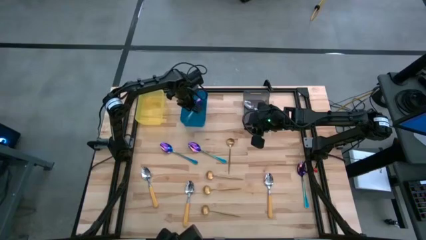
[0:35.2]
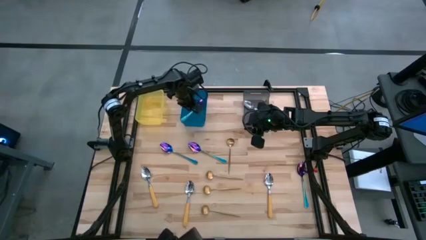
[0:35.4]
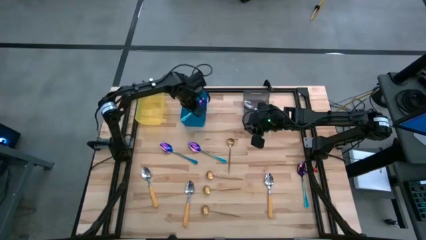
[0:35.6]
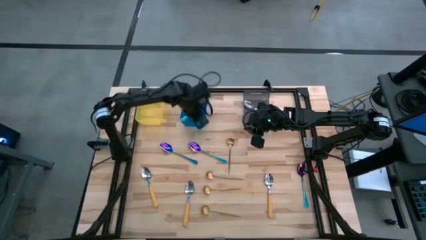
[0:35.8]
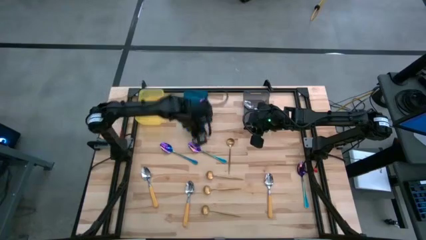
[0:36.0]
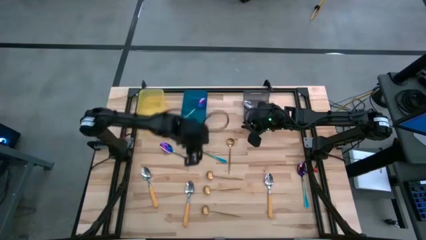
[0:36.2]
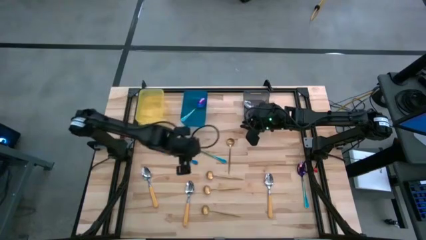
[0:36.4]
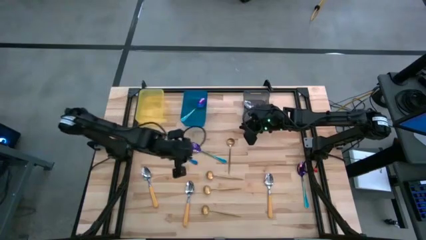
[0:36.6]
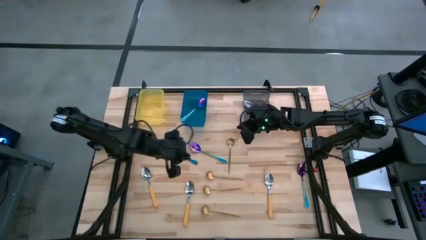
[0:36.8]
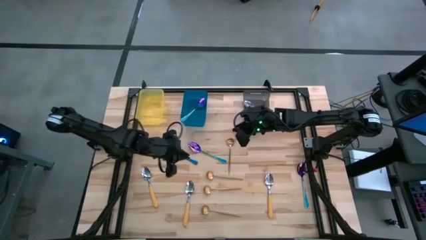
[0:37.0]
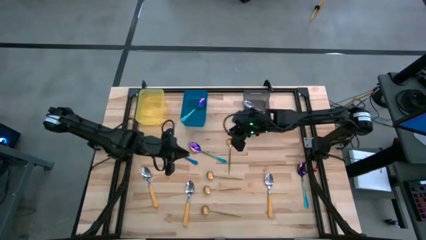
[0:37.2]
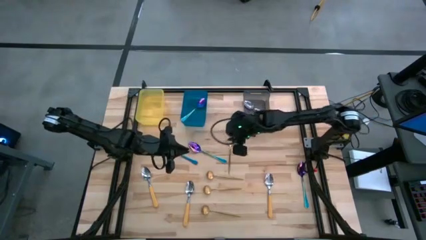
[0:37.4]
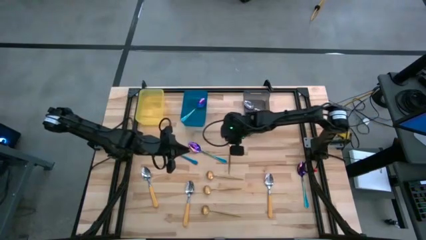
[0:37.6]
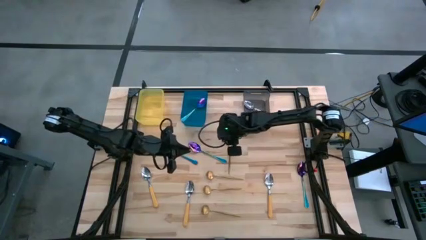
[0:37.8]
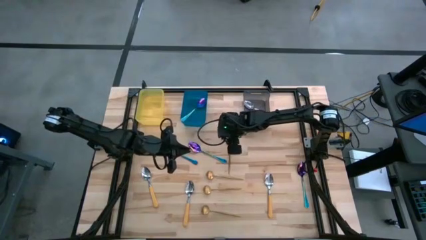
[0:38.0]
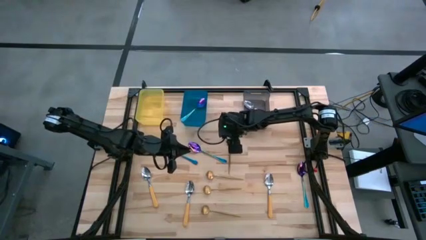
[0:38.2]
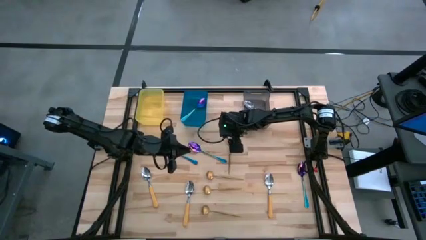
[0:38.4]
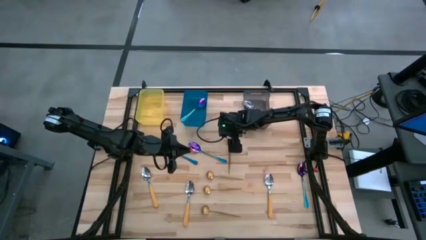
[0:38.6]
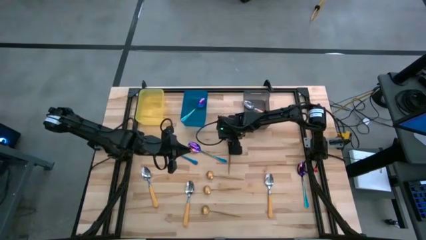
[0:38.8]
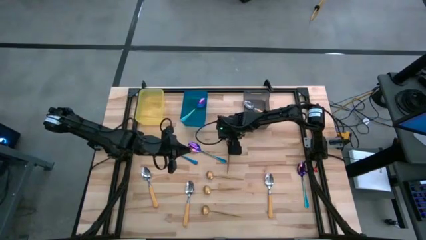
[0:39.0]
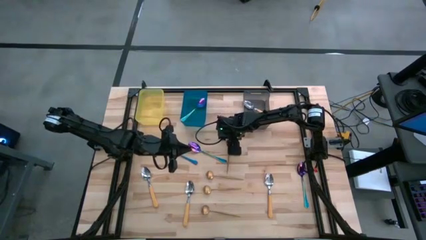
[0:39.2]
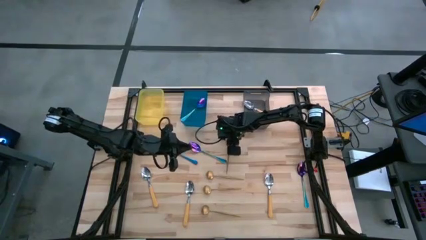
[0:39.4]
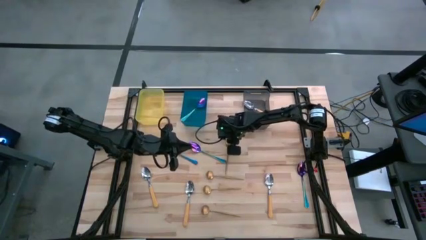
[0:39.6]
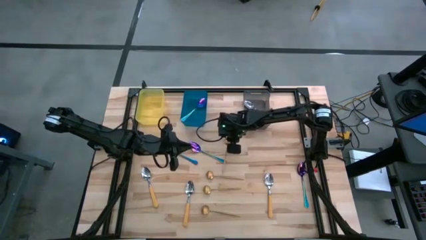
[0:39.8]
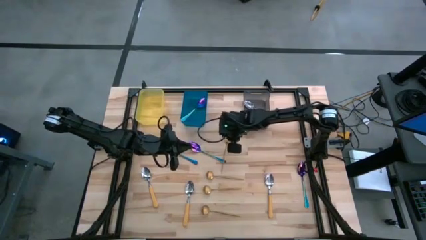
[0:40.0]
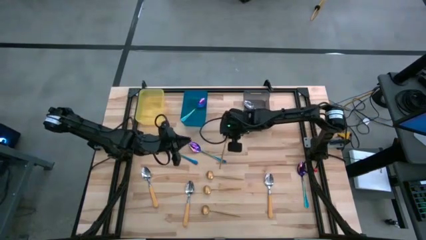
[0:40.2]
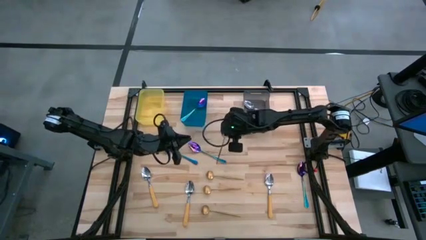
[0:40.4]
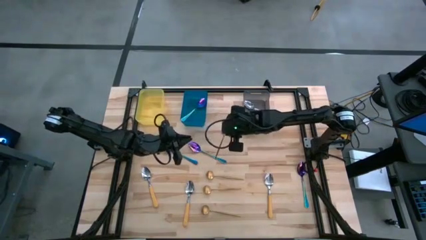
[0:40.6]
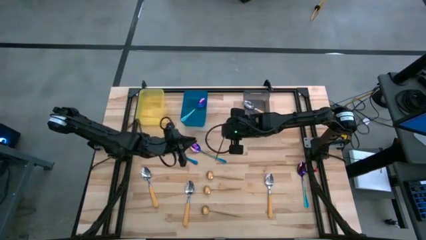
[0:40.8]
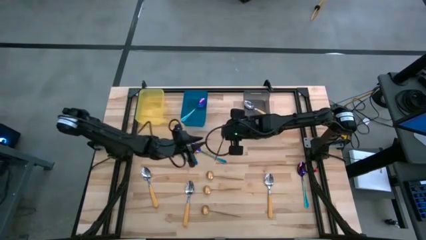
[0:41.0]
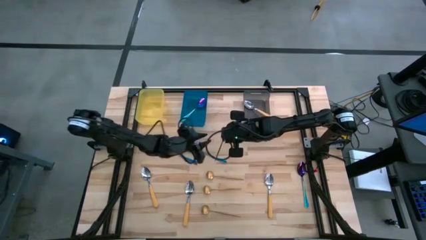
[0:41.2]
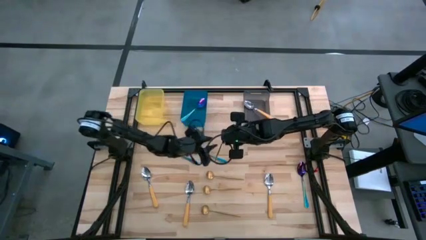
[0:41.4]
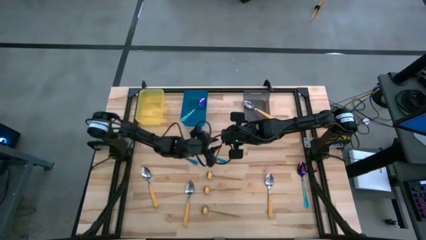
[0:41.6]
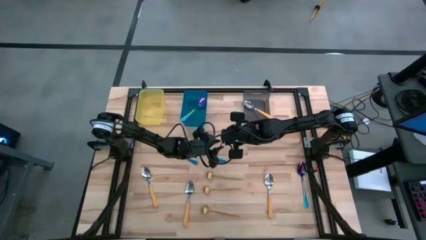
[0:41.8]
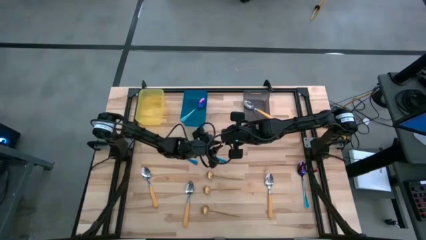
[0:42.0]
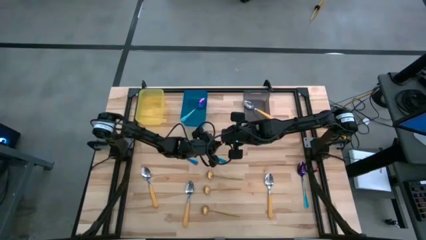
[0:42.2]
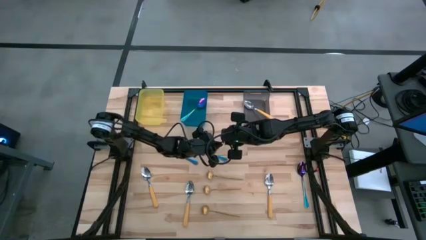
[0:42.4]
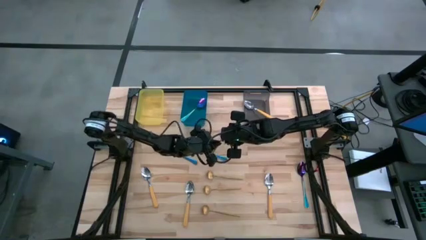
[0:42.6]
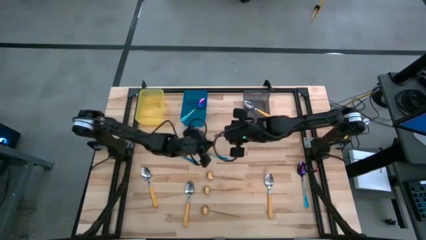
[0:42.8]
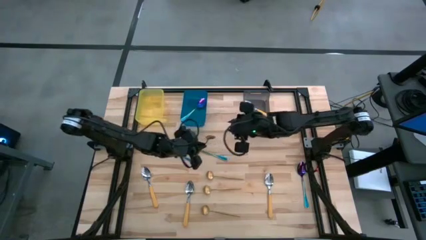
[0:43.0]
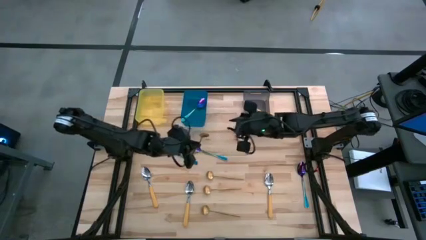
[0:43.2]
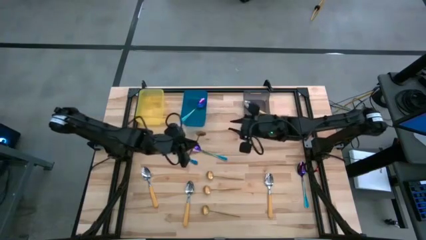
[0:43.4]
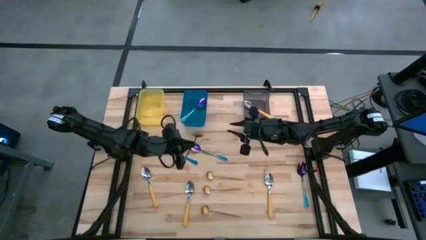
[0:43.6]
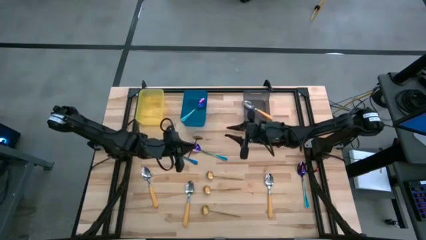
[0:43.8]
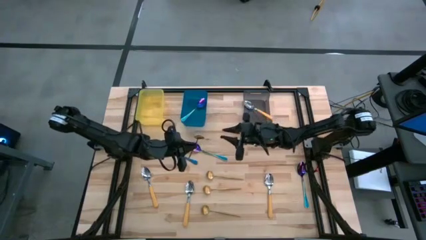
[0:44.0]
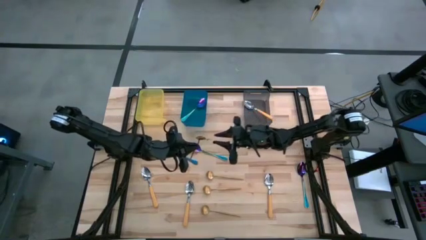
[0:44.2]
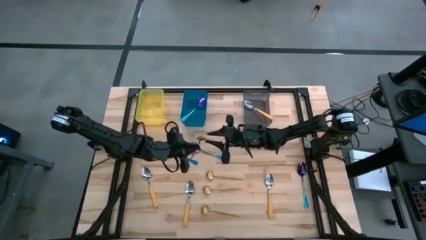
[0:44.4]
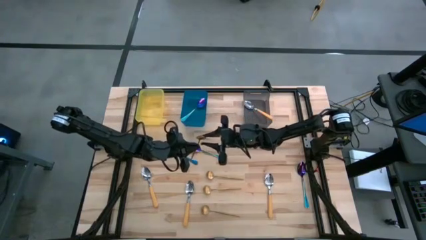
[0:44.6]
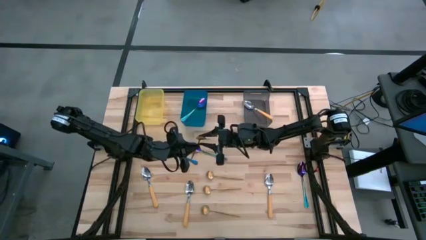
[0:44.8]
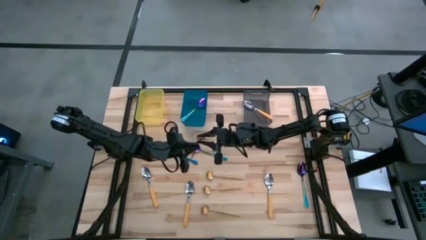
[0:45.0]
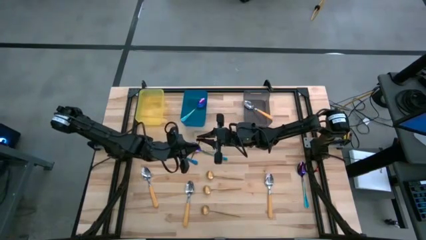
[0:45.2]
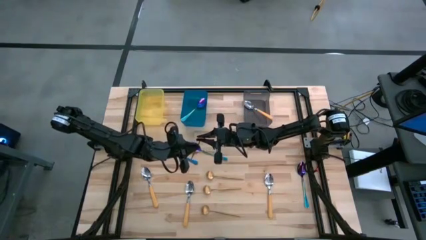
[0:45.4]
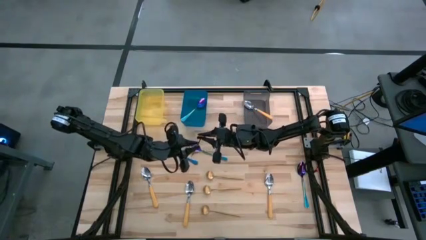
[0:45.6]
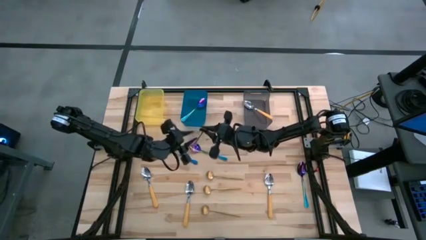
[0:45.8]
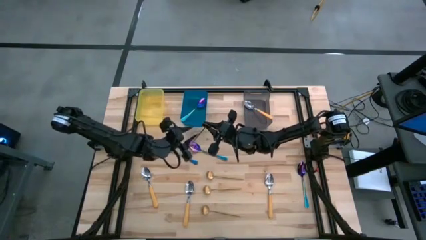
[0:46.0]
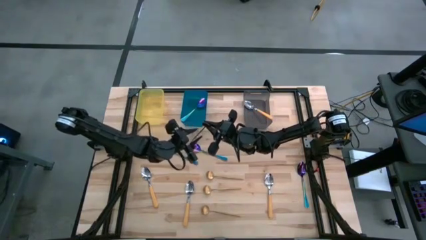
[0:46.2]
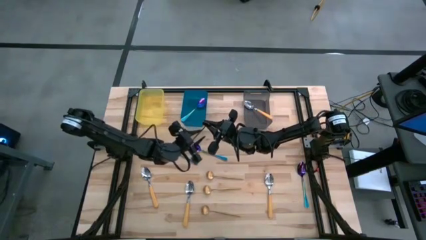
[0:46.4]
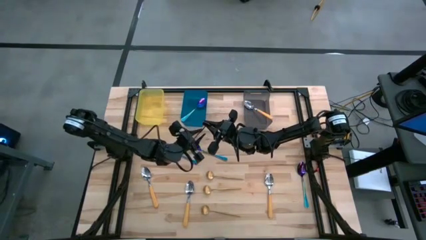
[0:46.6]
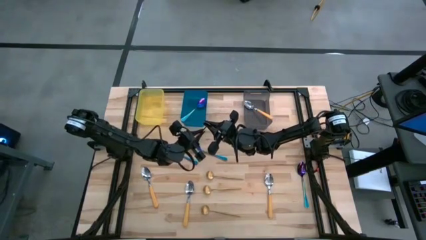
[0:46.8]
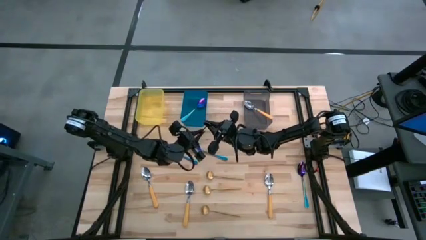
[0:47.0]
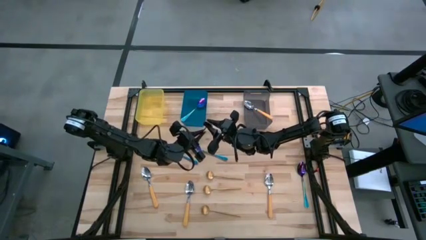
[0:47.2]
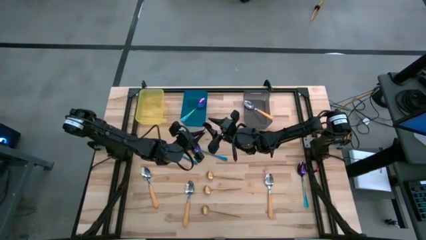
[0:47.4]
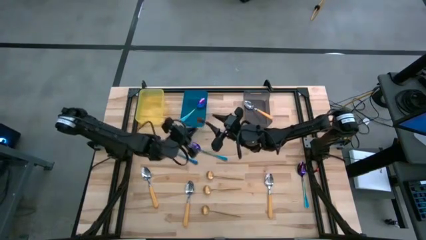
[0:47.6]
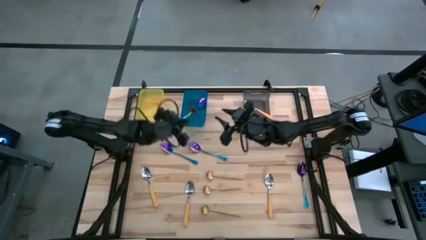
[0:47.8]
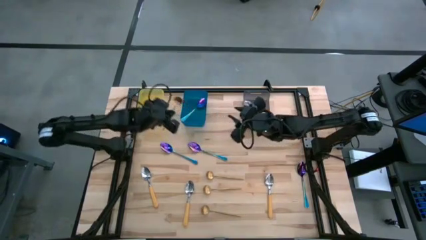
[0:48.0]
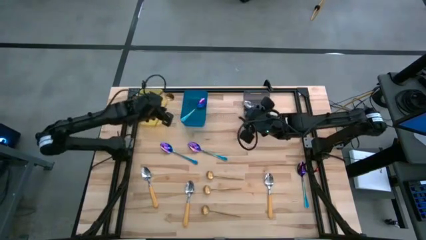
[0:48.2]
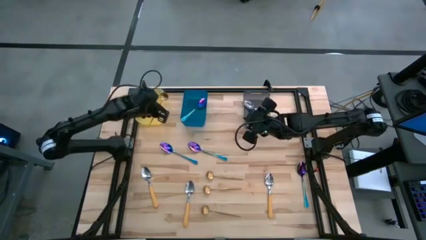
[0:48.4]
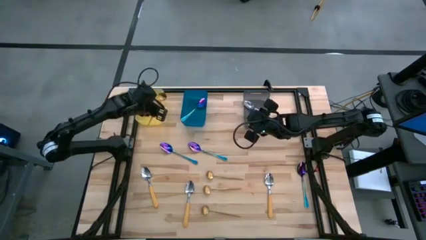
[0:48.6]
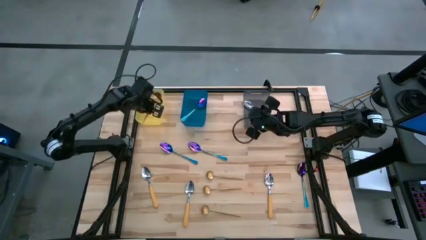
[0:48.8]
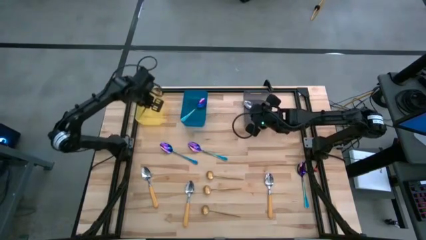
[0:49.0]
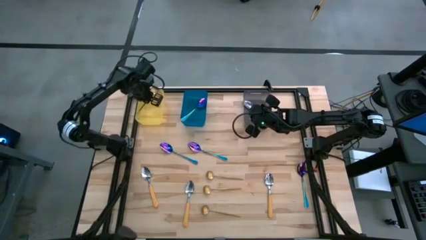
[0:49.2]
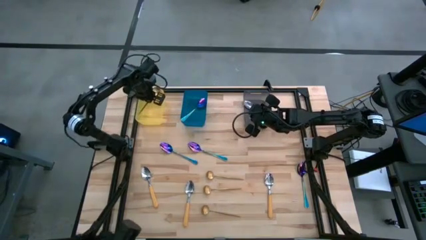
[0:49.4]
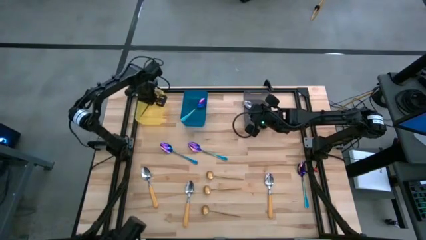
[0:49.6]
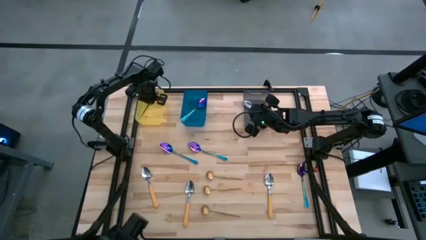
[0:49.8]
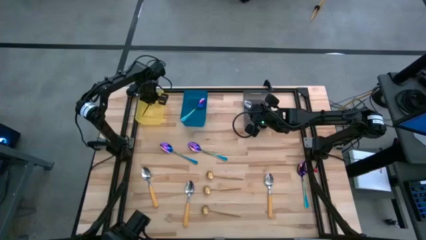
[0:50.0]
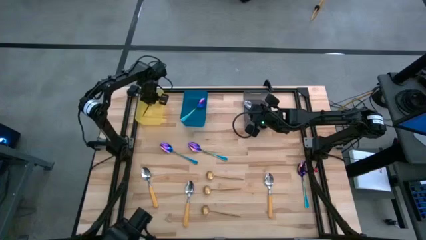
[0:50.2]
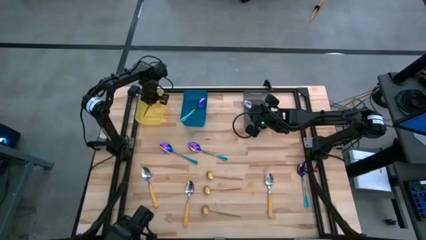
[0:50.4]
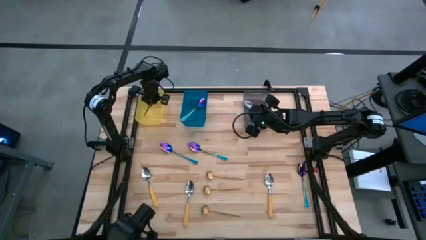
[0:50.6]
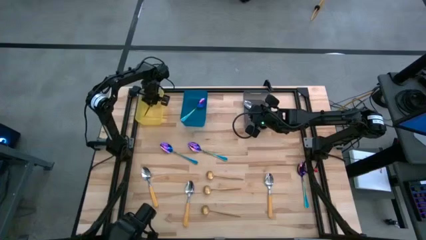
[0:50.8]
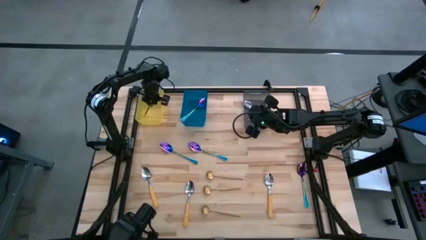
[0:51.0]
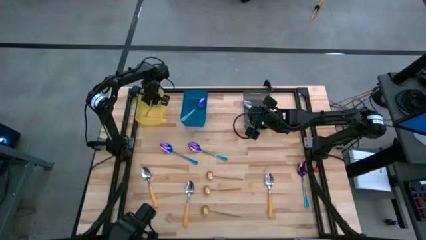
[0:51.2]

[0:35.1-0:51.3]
Task: Sort silverware by color (type)
Put the gold spoon into the yellow bin

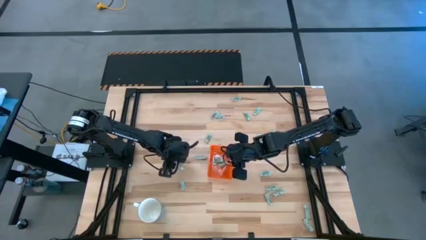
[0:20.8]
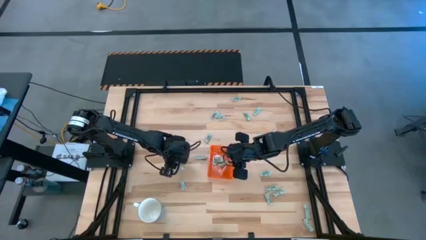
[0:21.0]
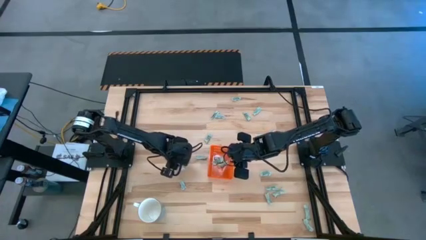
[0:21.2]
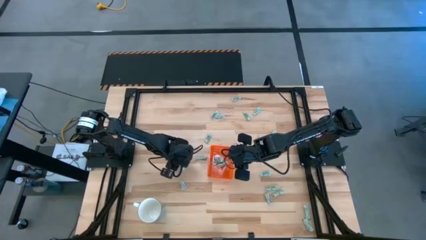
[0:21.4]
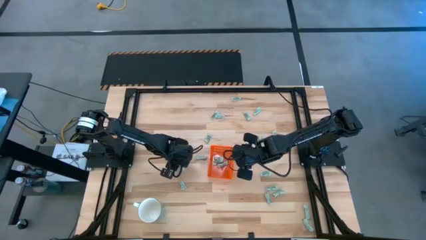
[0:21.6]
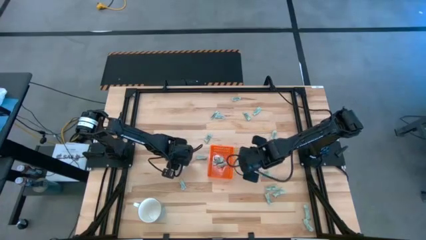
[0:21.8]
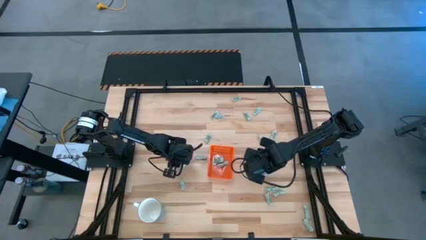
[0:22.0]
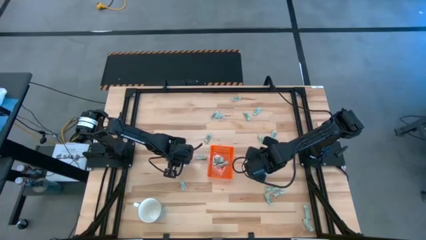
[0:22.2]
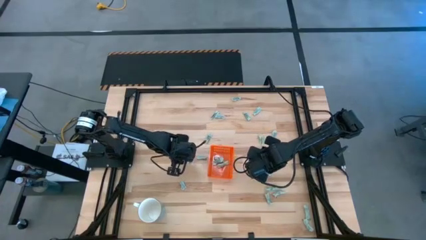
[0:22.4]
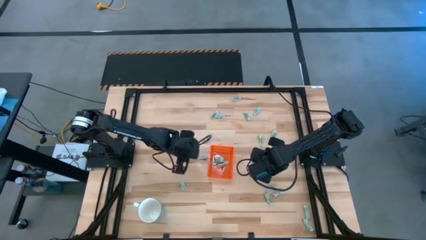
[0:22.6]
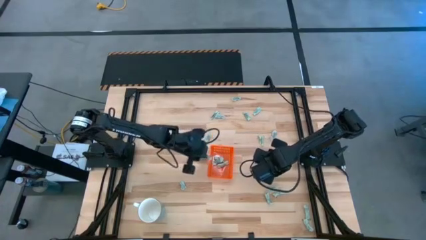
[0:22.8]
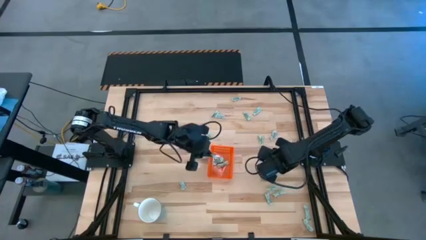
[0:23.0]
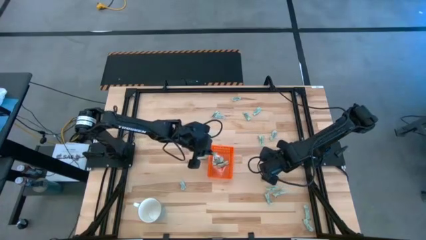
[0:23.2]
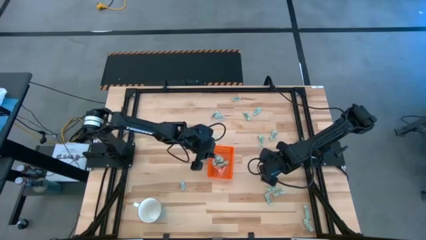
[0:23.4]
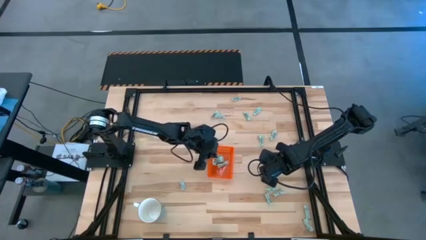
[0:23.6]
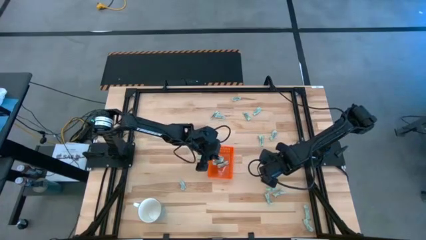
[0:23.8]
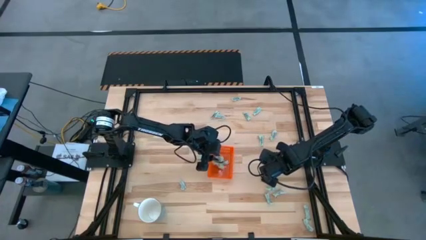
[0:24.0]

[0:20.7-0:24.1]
Task: Pick and place Stevia / Truvia into bins
Put the stevia packet into the orange bin
